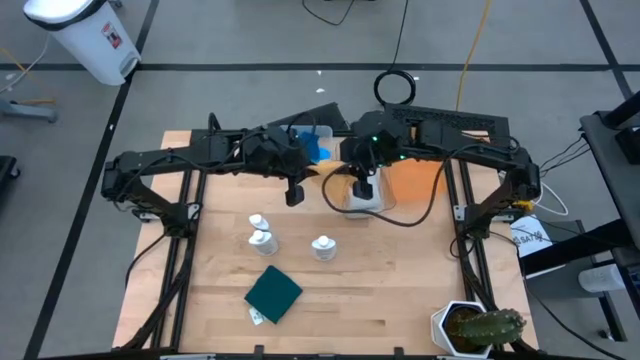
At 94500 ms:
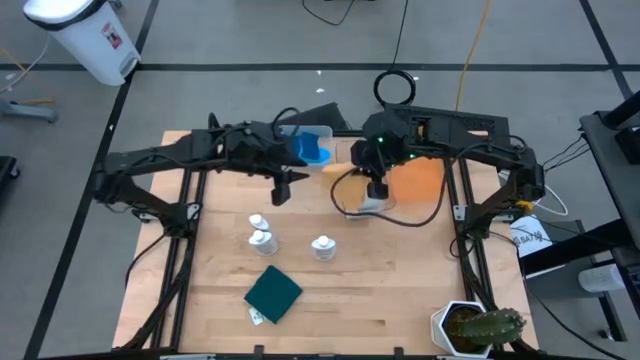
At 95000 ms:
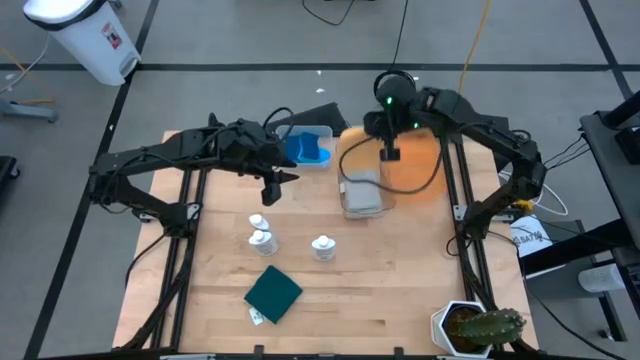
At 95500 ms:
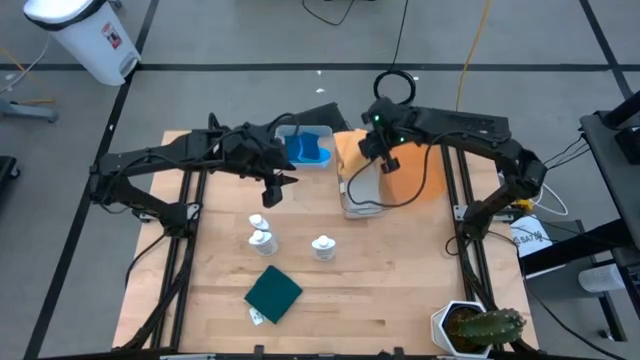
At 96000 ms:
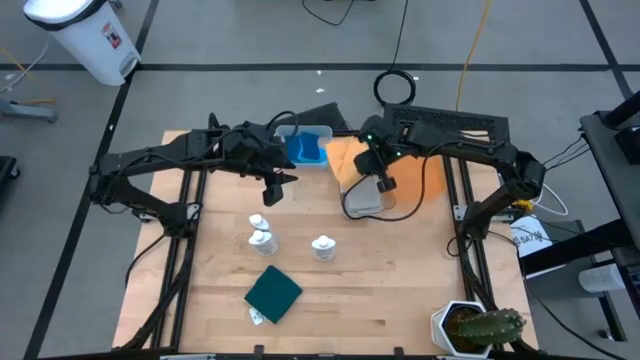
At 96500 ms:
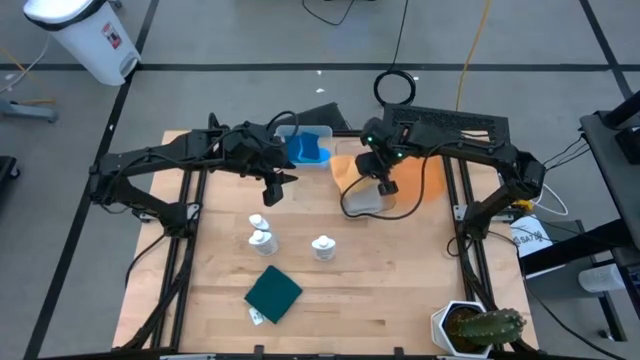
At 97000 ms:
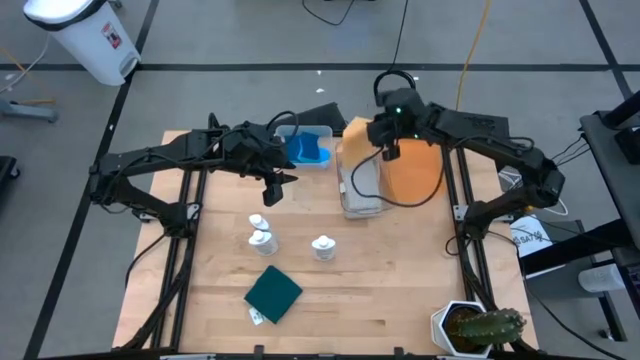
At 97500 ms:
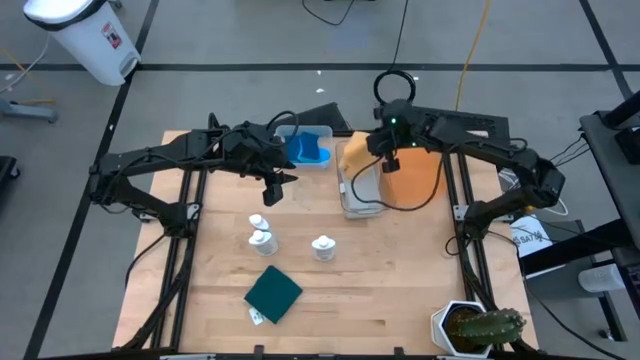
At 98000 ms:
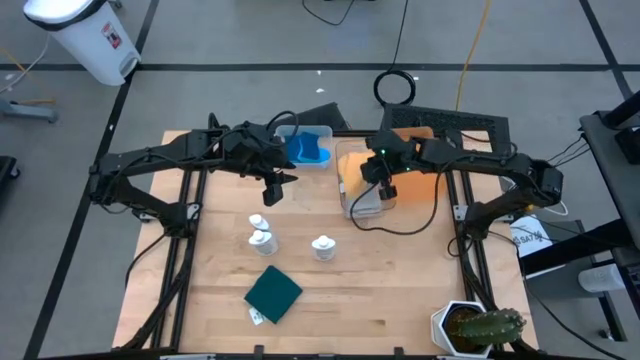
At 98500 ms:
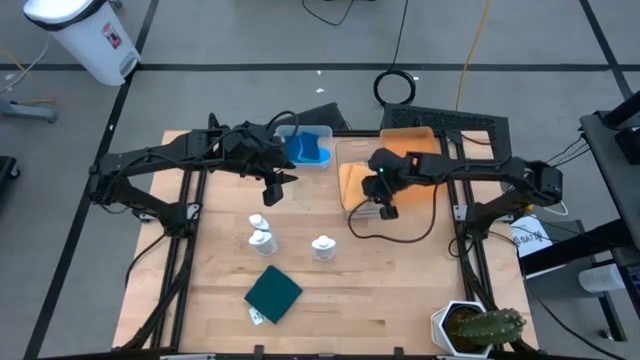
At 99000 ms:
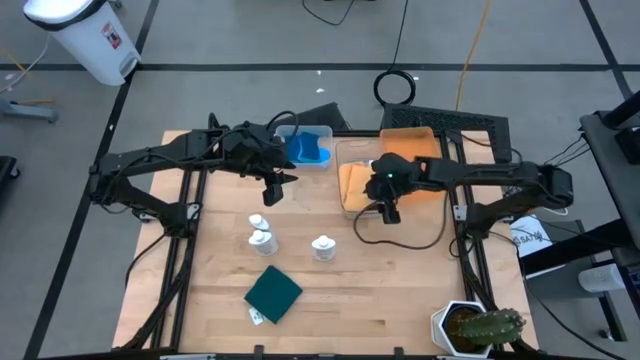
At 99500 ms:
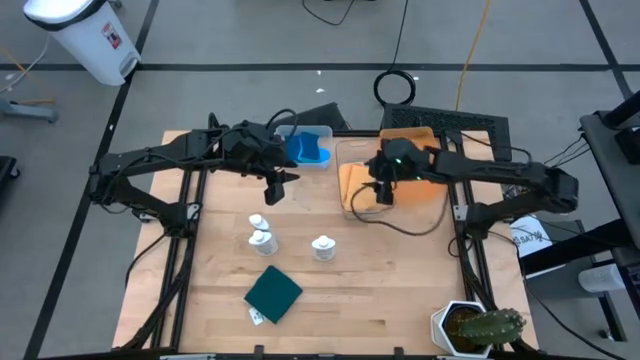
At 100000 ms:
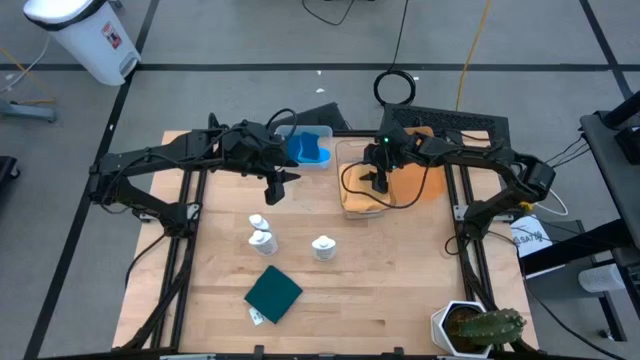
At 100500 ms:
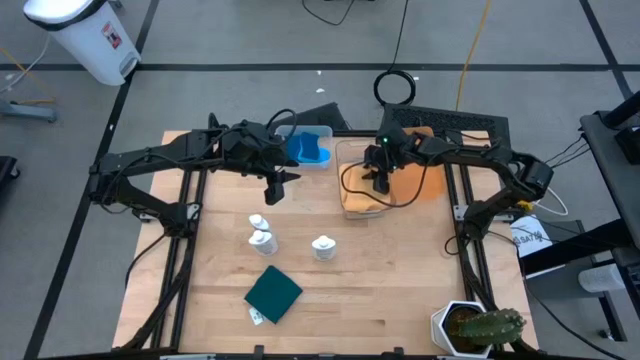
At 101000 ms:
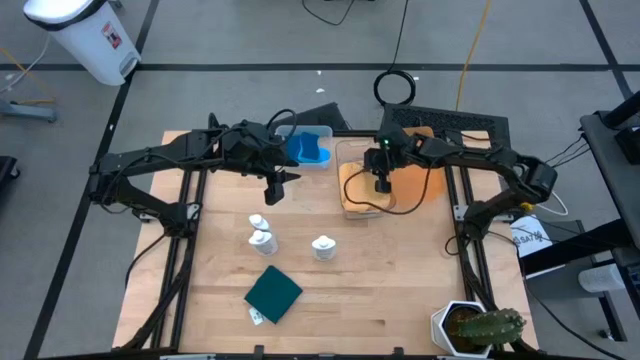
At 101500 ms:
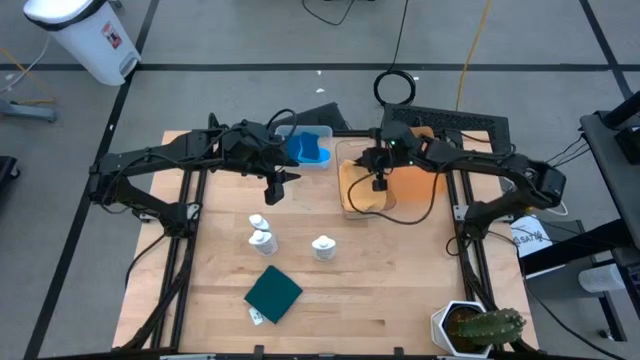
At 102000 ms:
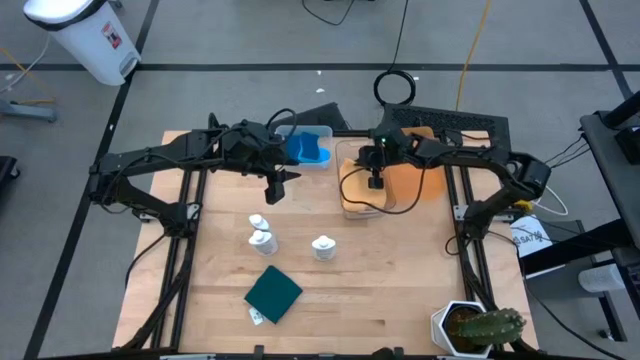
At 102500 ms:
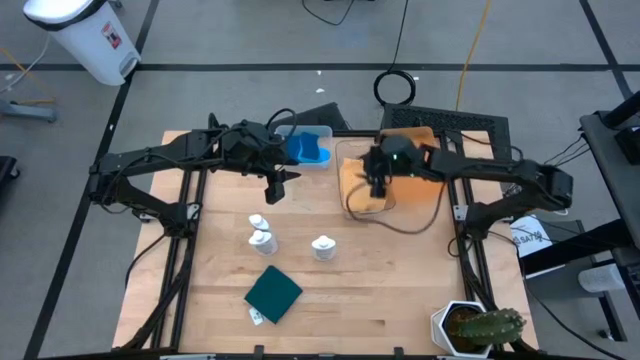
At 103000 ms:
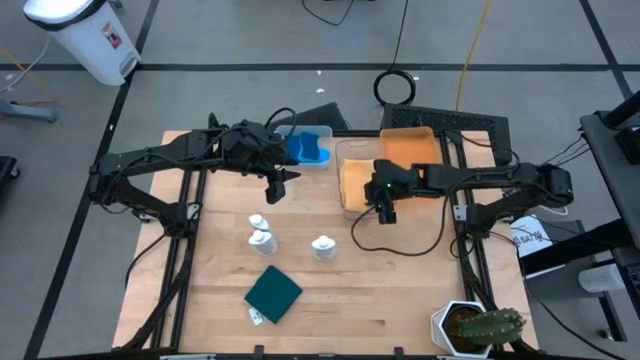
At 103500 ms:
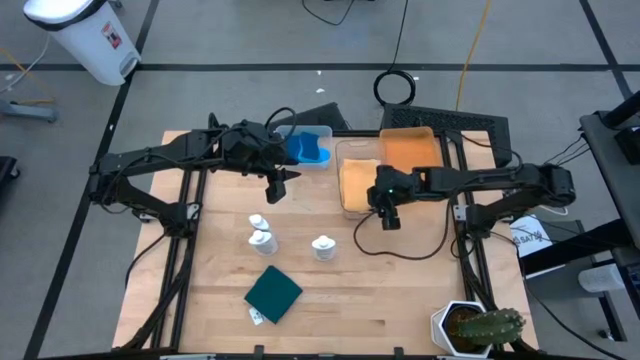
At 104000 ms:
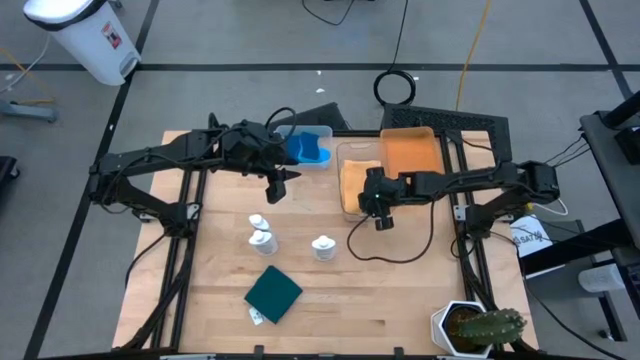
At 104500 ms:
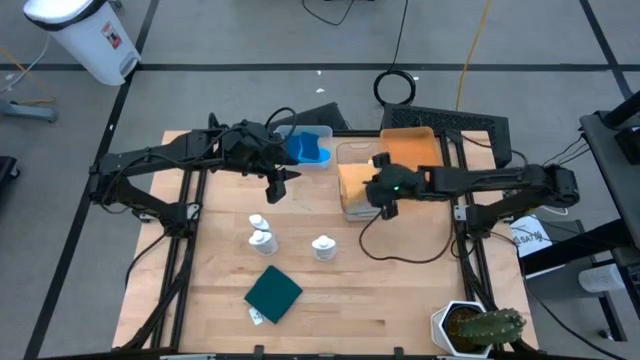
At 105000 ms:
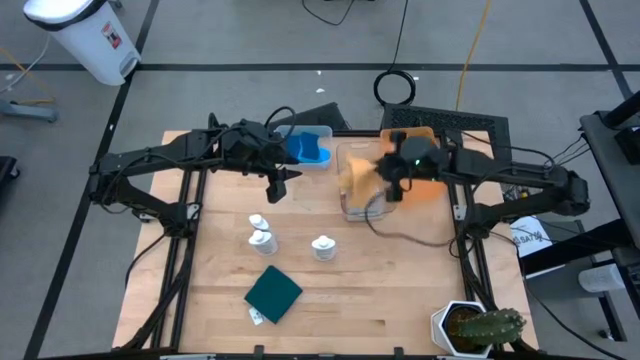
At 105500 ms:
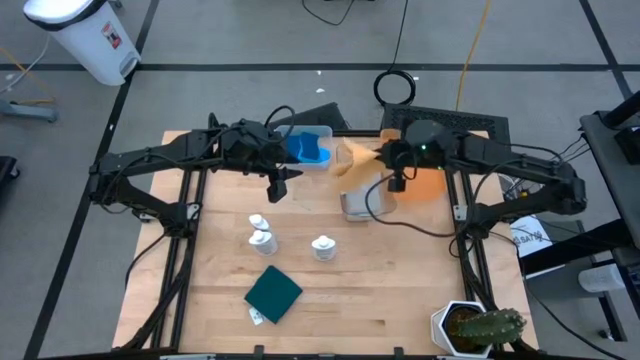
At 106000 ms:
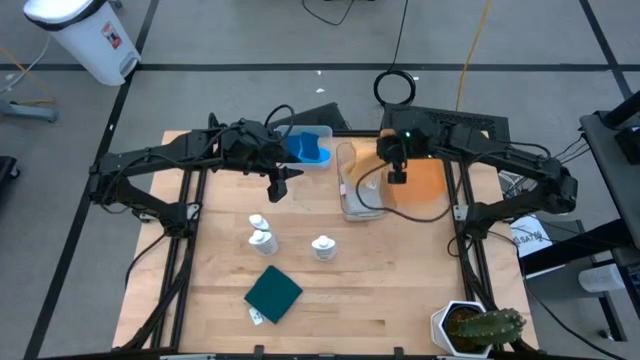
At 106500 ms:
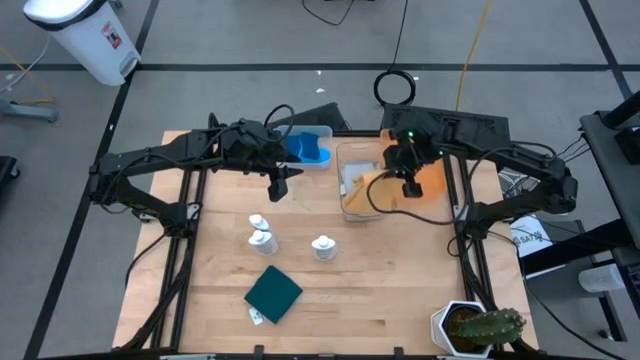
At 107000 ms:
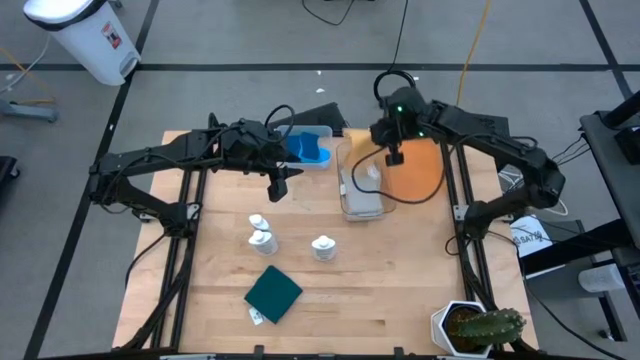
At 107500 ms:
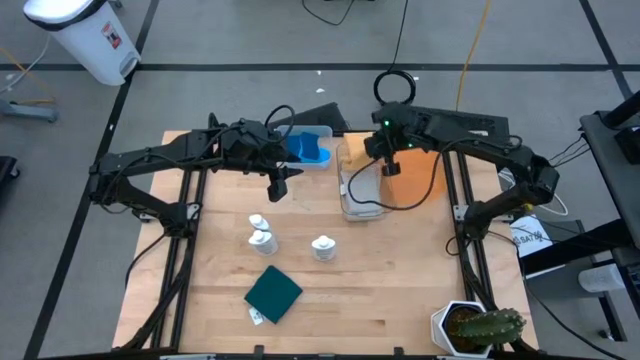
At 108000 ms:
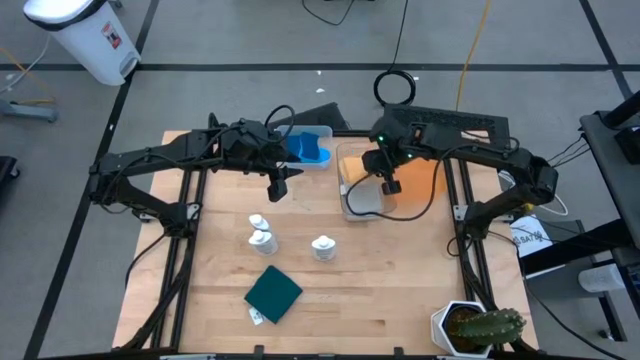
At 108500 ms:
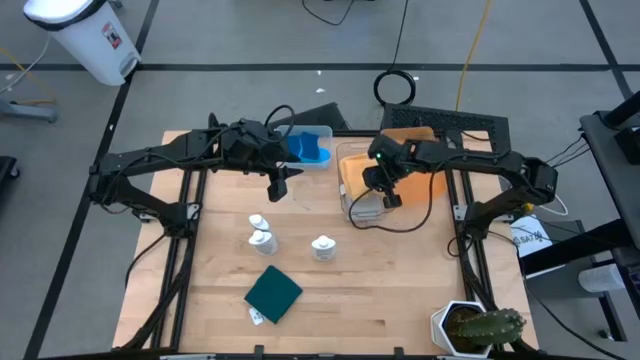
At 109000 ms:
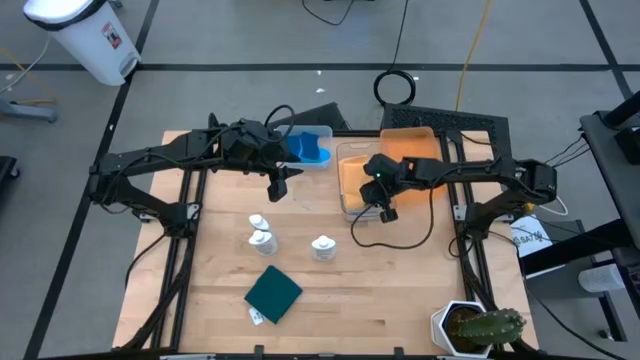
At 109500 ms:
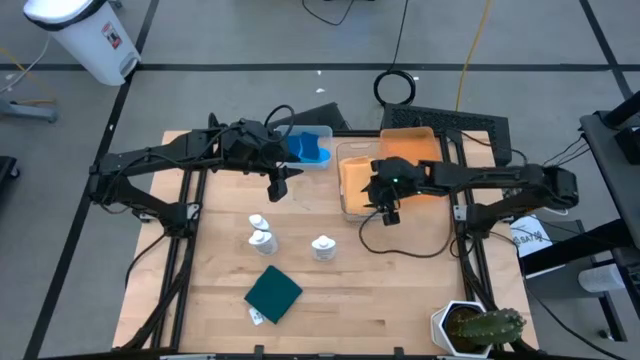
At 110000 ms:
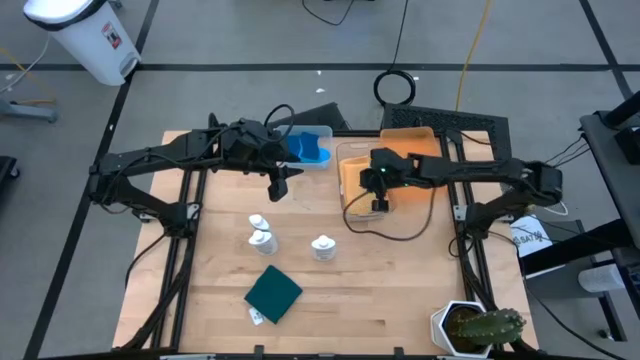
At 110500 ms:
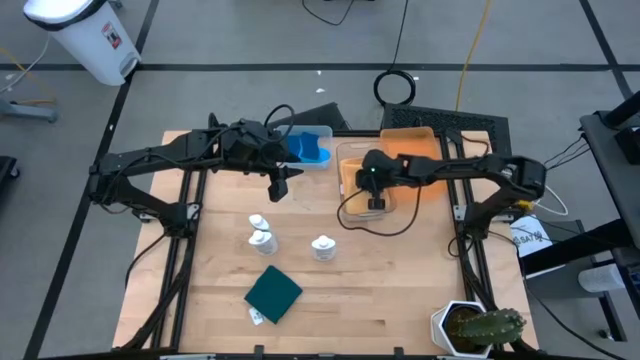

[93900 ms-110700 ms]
Task: Pick & Place Kitchen Items
Put the yellow towel into the transparent bin

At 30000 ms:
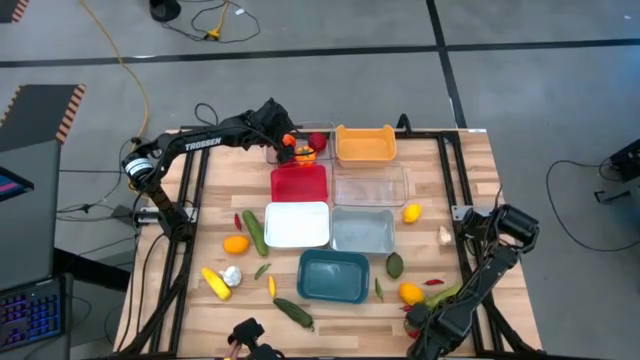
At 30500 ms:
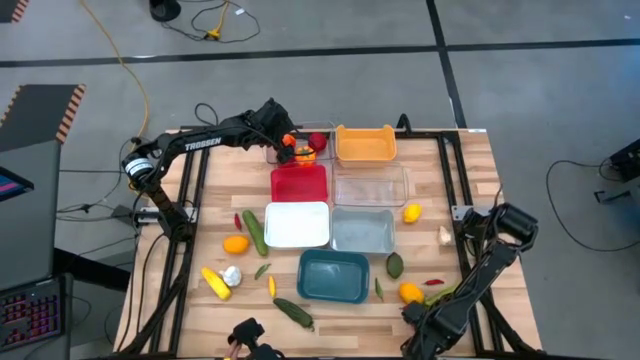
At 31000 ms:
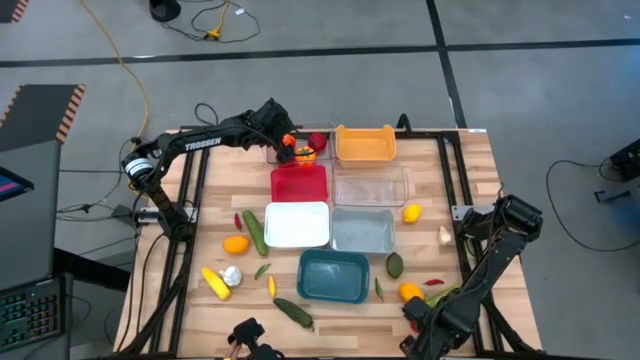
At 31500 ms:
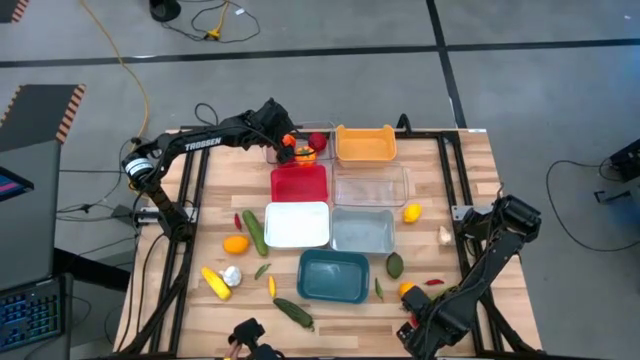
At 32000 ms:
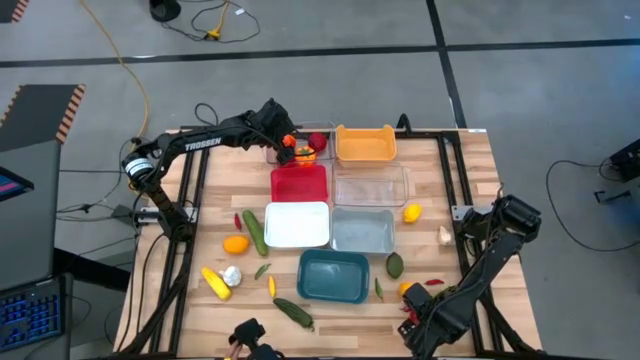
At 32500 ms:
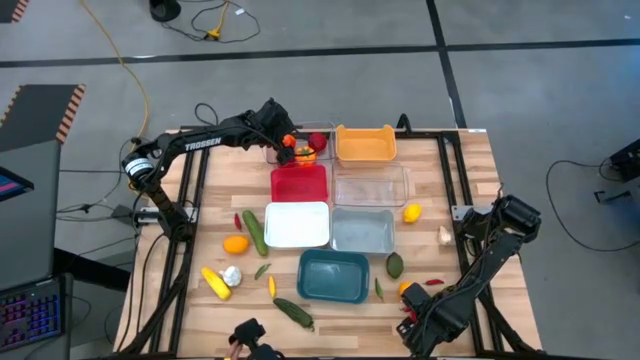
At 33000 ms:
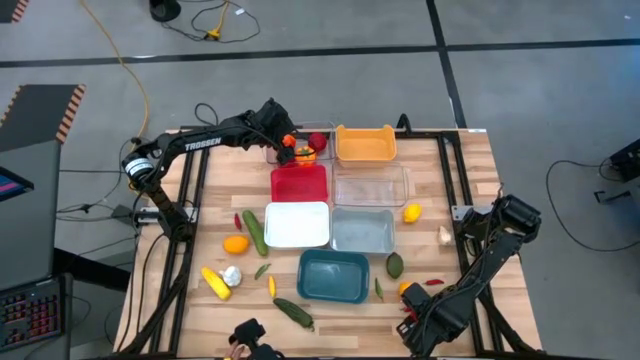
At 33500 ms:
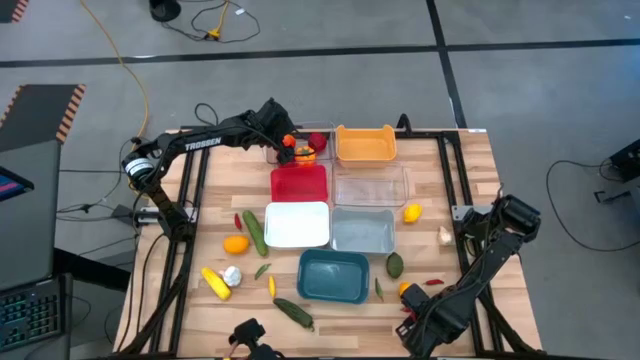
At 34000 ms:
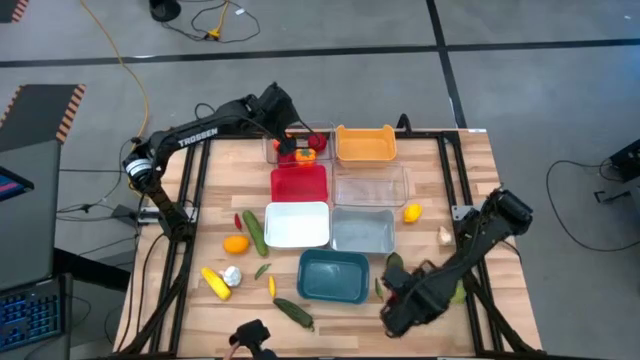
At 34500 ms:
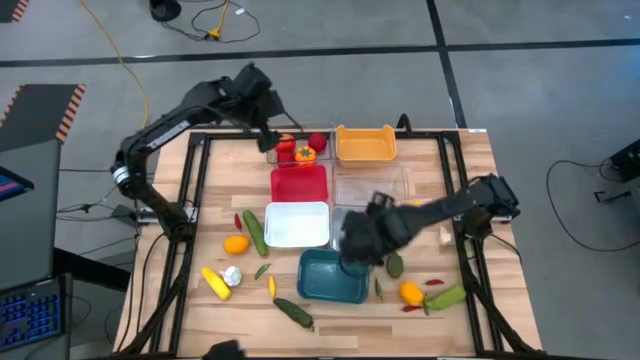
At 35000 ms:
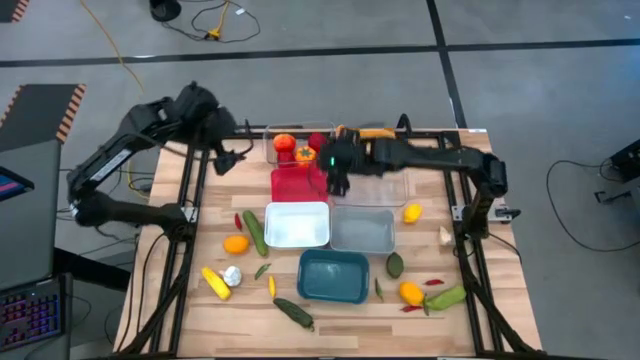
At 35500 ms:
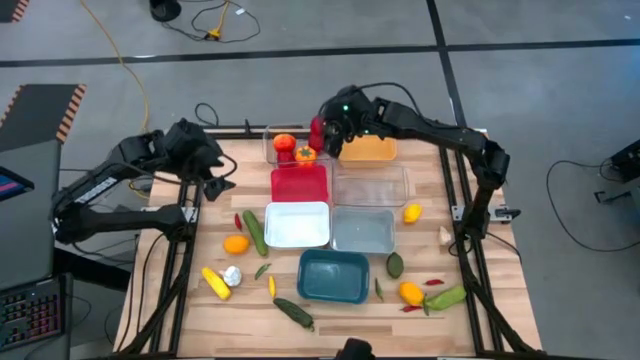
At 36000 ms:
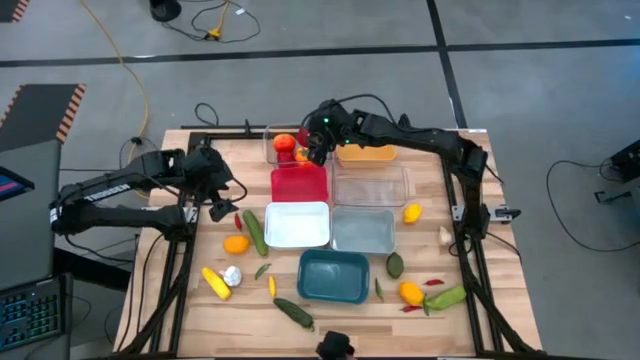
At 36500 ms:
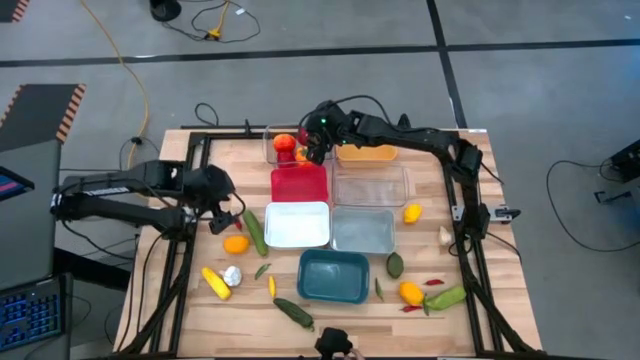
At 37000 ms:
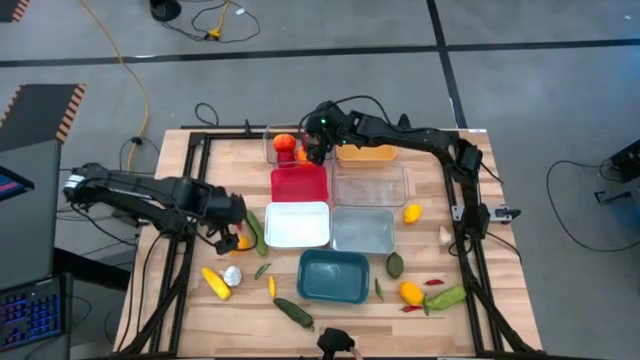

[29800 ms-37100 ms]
Task: Sort produce into baskets
Put the red tomato into the top transparent bin
